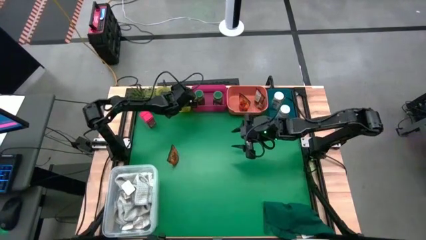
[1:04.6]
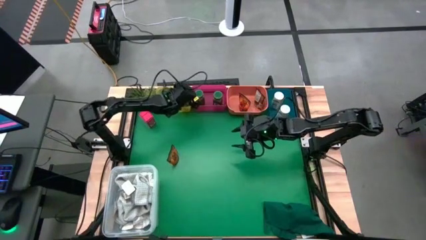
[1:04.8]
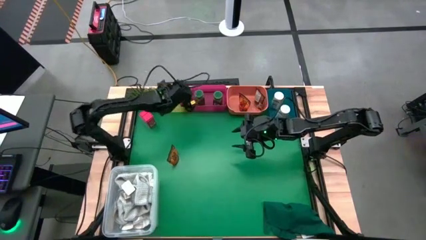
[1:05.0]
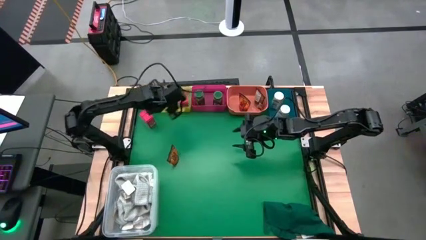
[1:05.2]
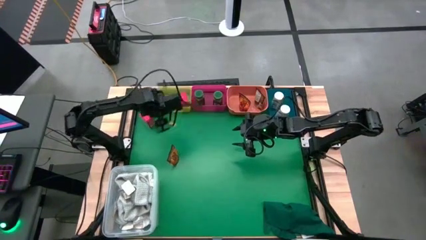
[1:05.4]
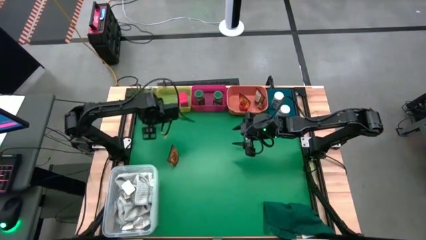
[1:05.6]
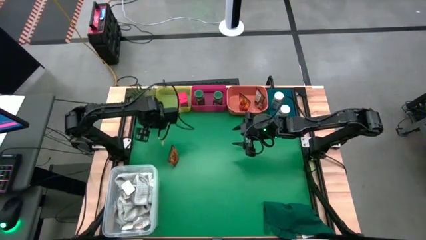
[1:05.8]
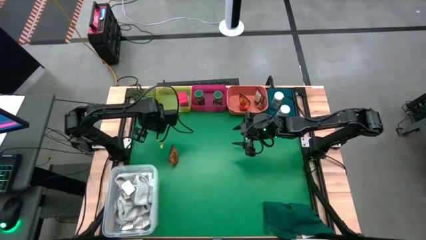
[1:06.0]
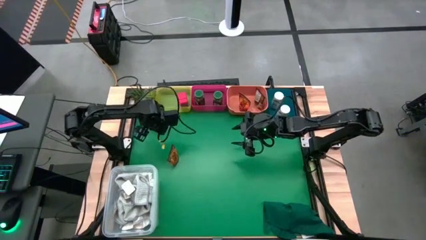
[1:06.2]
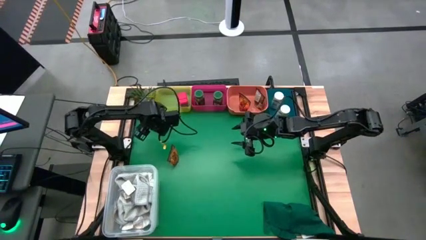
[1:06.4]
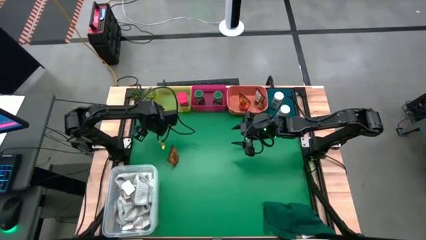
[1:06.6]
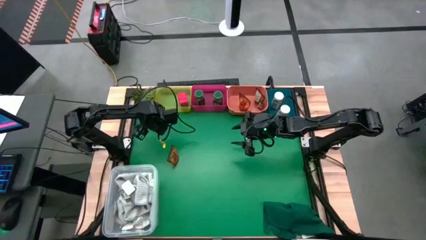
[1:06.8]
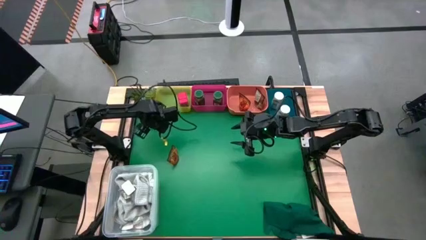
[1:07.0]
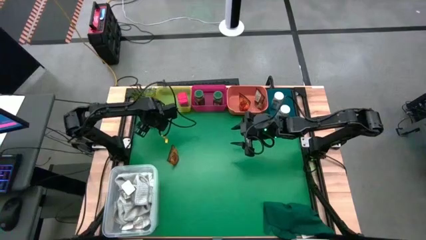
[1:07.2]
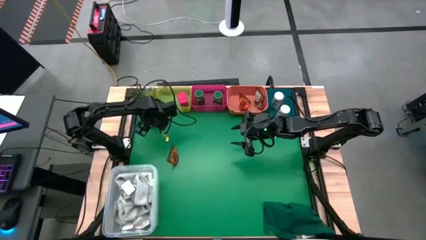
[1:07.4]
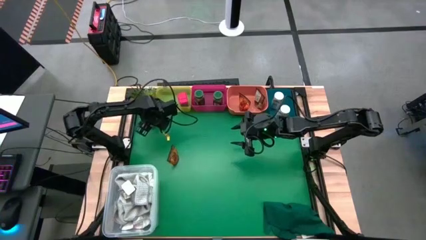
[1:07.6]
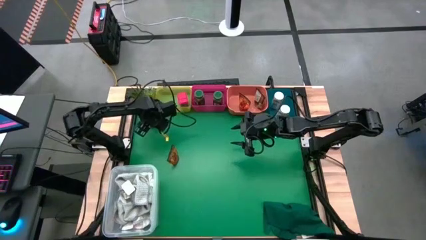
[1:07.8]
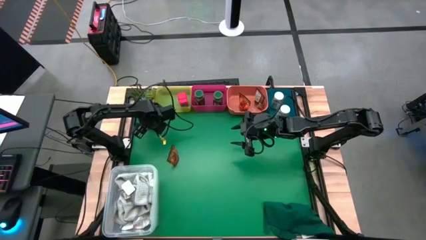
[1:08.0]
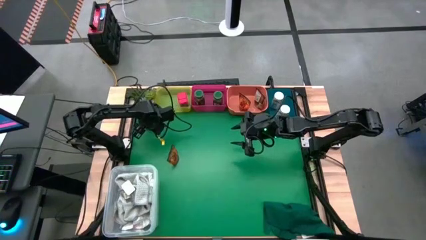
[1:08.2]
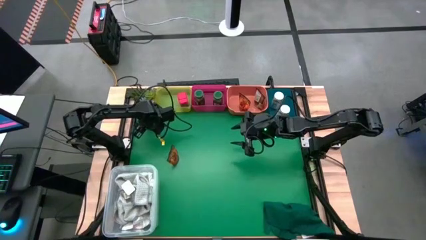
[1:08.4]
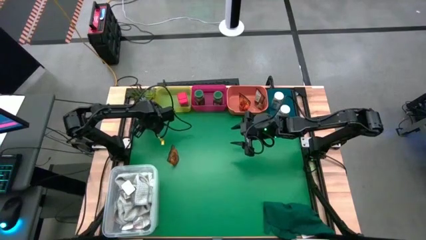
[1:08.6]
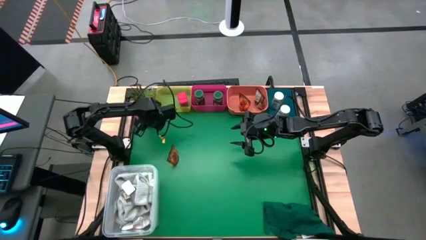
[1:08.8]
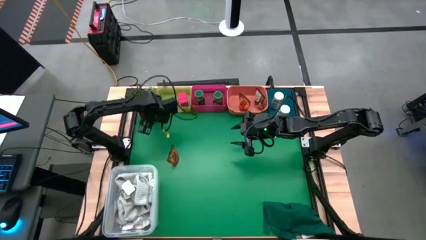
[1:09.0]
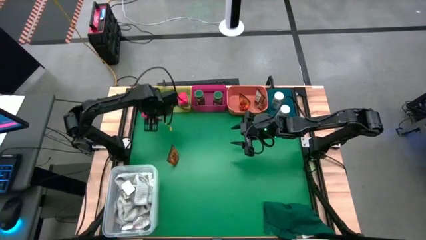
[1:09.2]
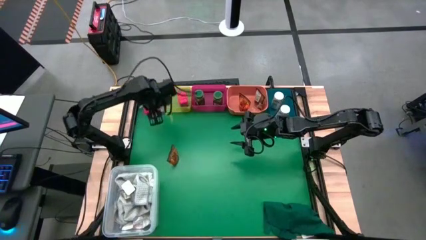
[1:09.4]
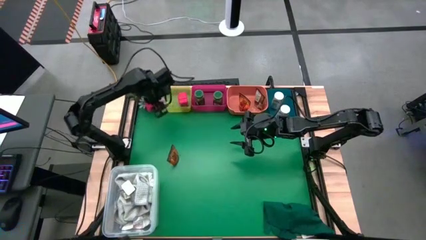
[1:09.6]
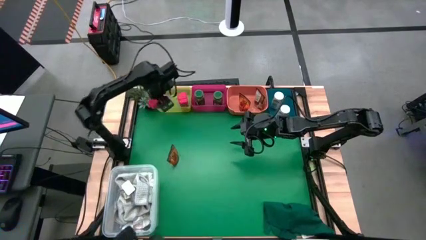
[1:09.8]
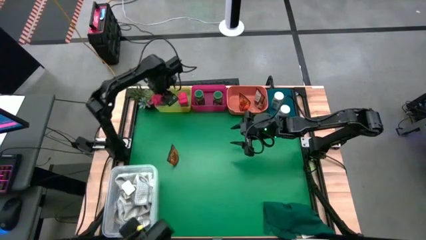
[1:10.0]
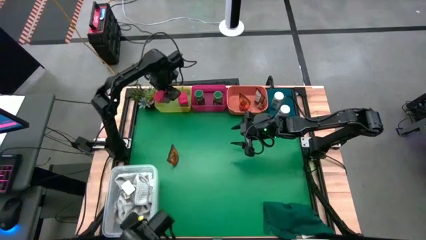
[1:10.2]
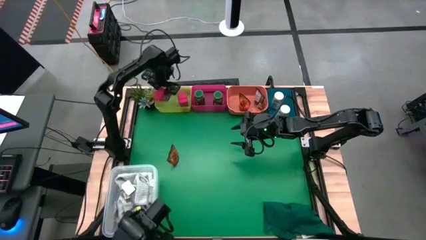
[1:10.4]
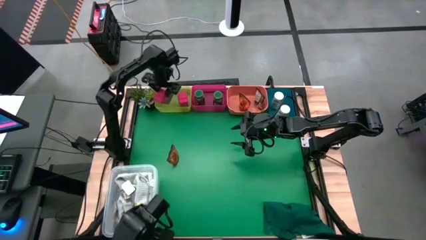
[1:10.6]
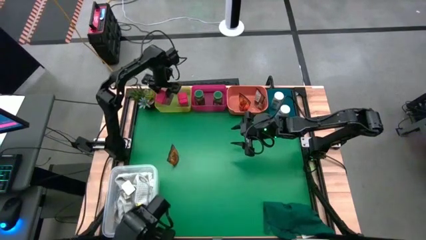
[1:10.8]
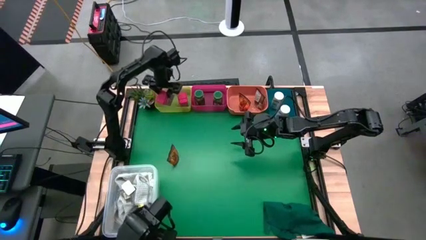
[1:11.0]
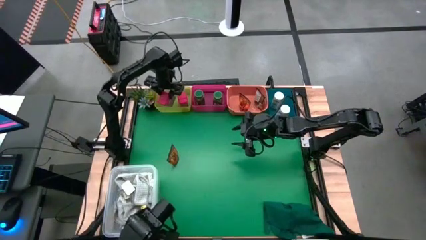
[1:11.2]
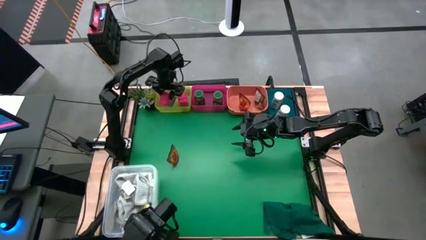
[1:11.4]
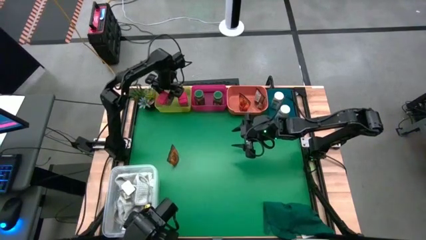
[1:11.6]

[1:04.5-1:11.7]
Task: Sort spices by type
Put the red seasoning can into the yellow bin

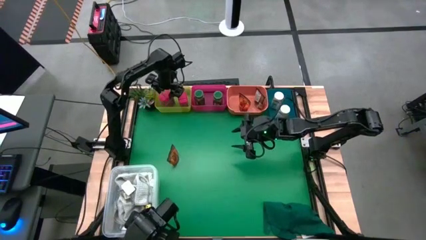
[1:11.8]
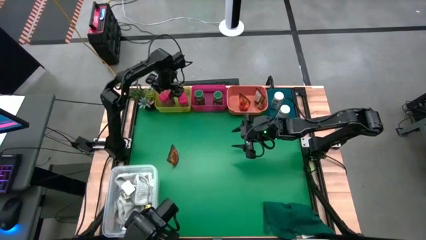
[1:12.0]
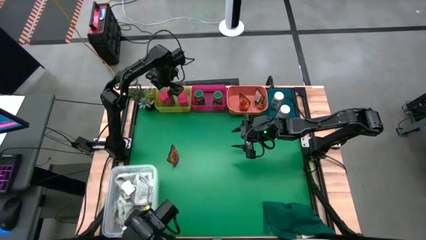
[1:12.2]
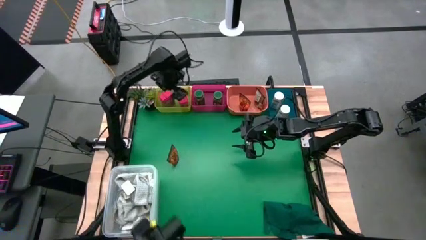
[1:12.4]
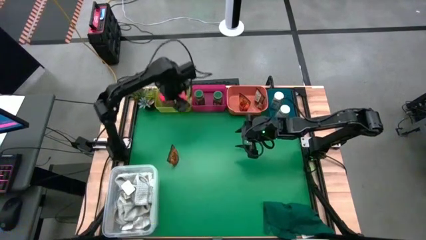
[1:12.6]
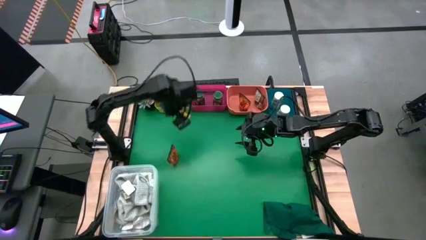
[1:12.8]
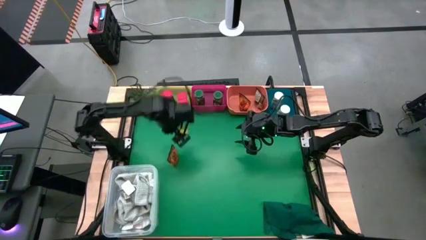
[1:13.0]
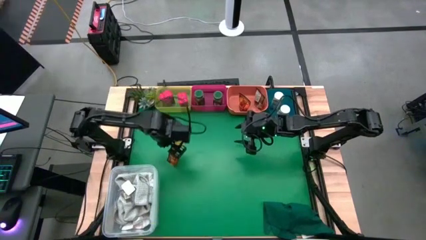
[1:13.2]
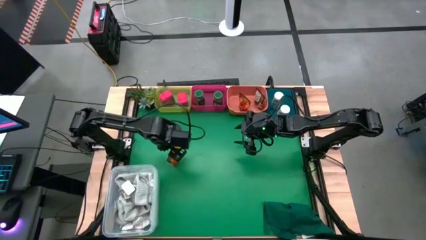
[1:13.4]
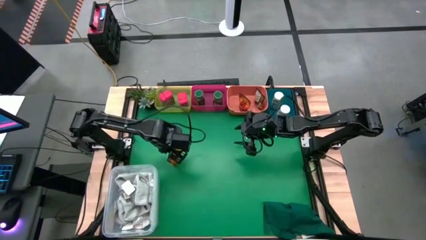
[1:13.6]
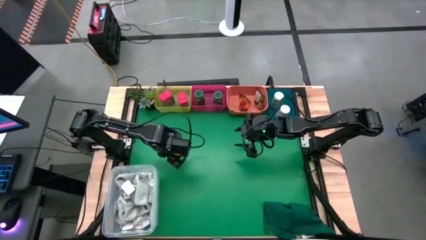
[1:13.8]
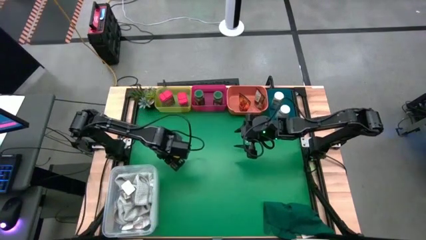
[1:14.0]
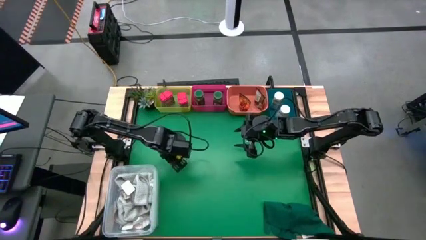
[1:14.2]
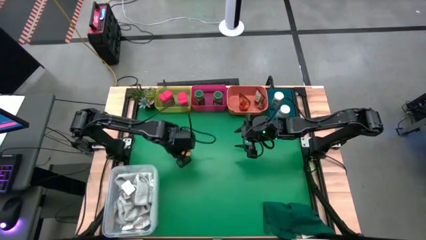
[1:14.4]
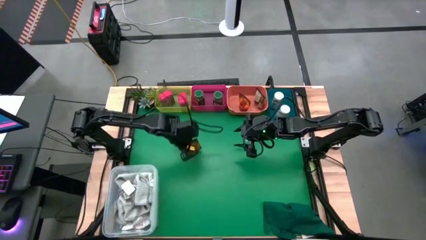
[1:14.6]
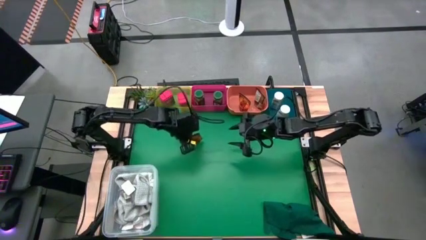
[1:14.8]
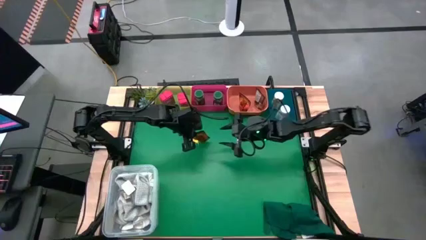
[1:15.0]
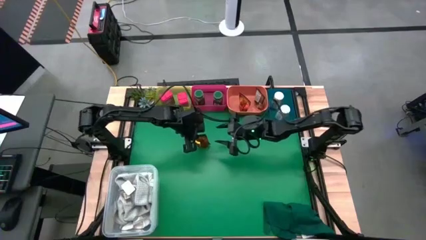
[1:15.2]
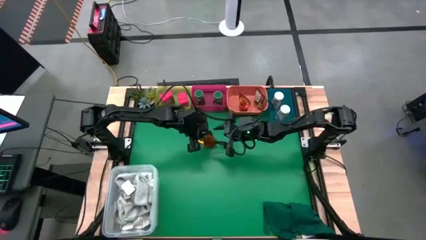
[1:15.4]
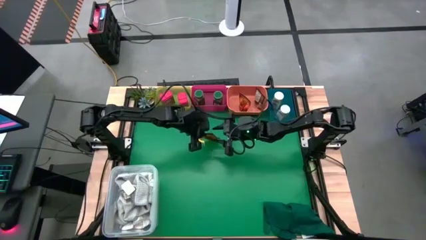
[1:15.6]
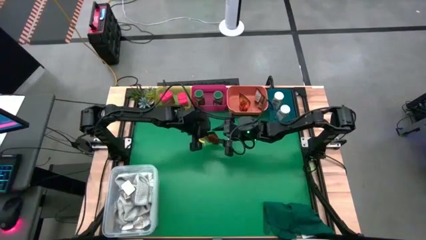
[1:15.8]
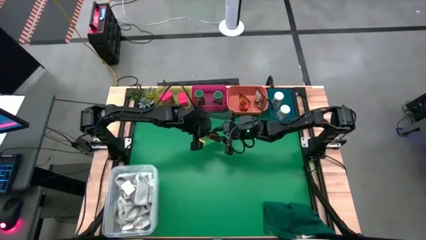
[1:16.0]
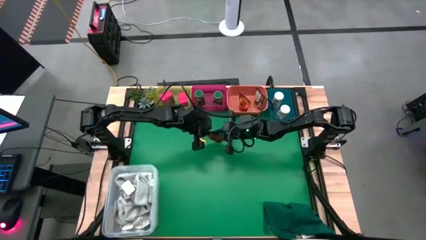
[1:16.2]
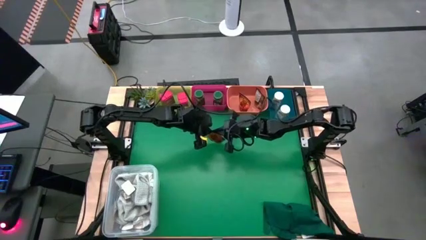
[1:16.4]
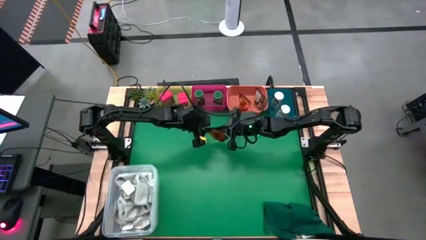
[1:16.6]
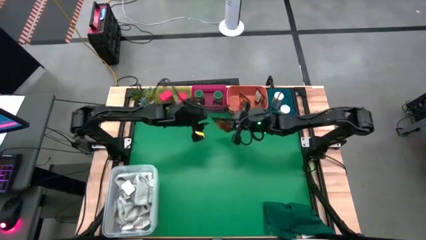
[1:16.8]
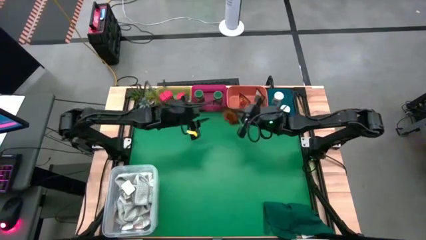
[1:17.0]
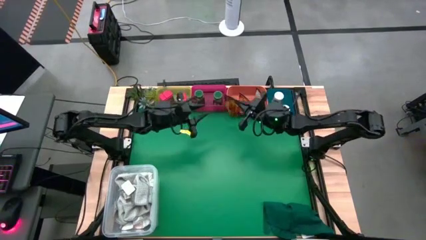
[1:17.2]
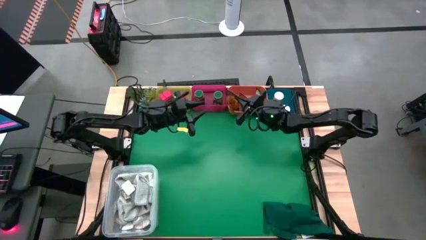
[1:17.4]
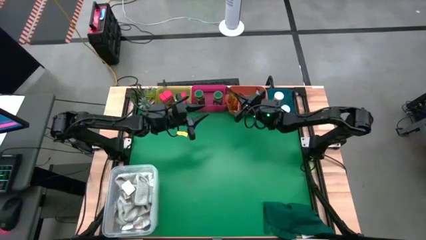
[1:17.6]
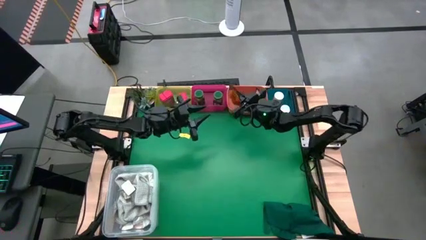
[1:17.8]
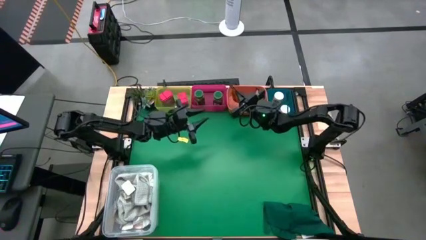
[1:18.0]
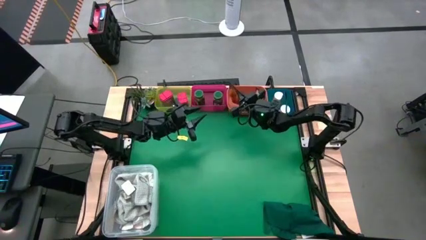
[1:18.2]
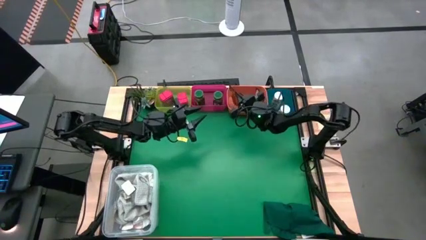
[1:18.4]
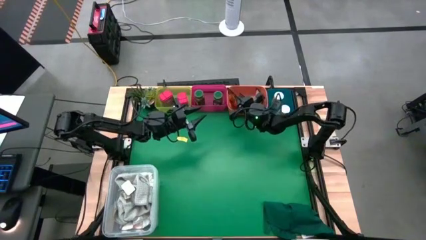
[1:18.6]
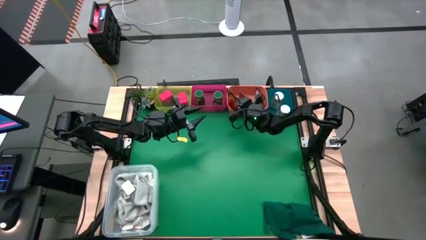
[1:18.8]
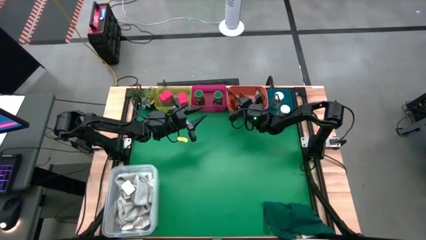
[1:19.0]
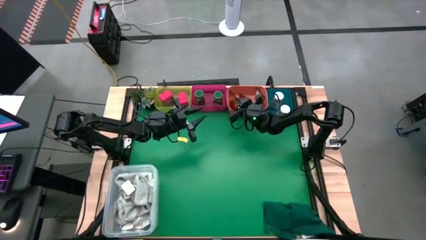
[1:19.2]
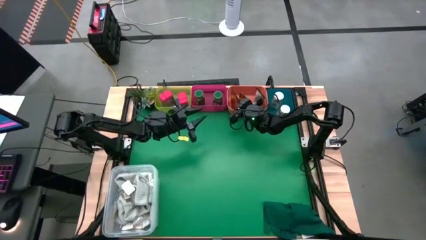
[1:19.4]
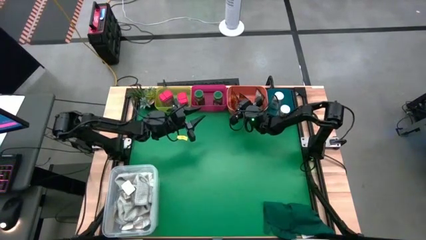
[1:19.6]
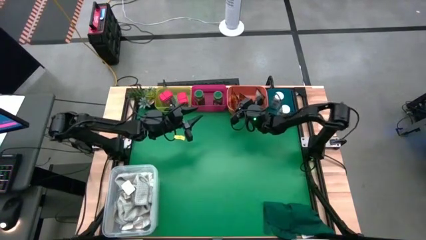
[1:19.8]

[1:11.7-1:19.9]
Put the orange seasoning pack into the orange bin
